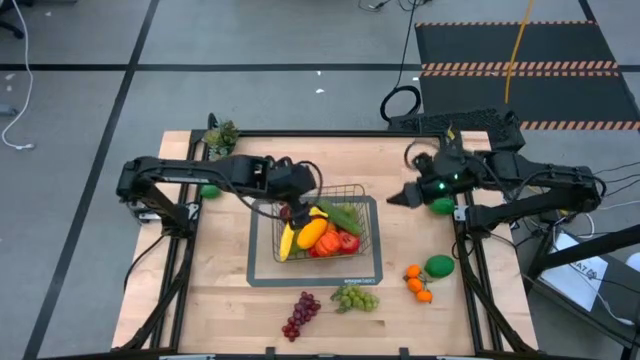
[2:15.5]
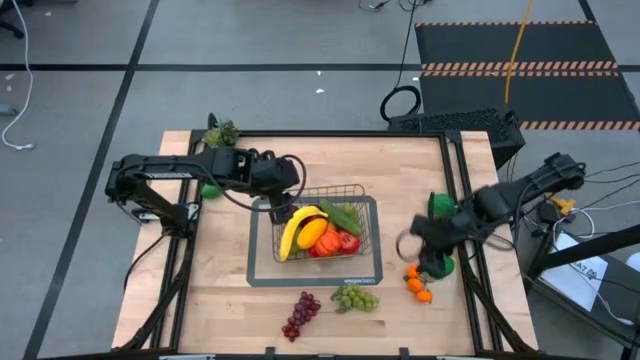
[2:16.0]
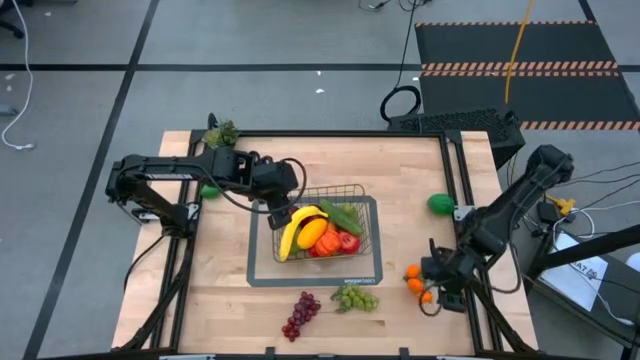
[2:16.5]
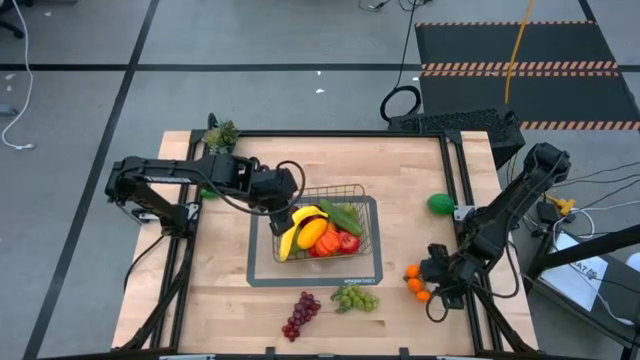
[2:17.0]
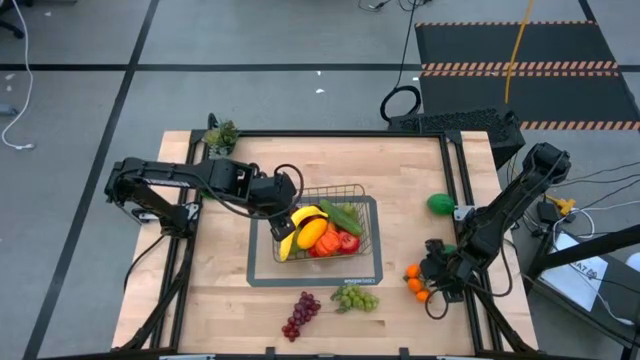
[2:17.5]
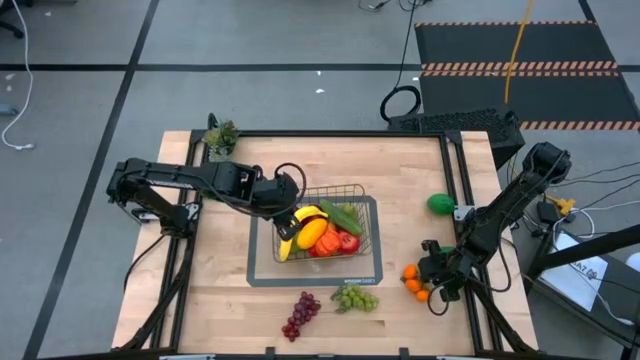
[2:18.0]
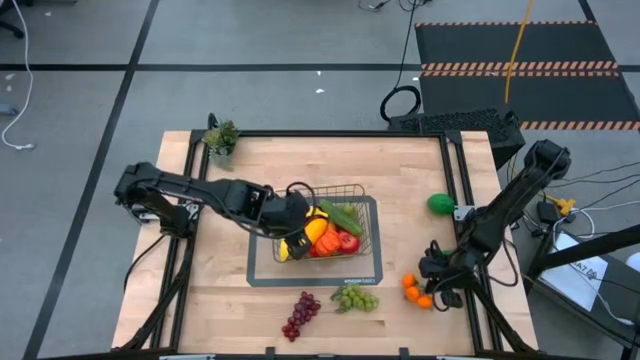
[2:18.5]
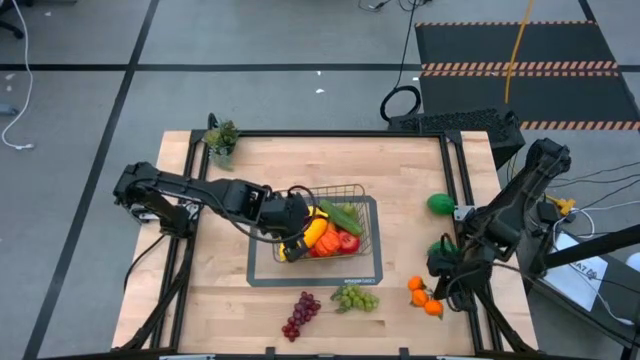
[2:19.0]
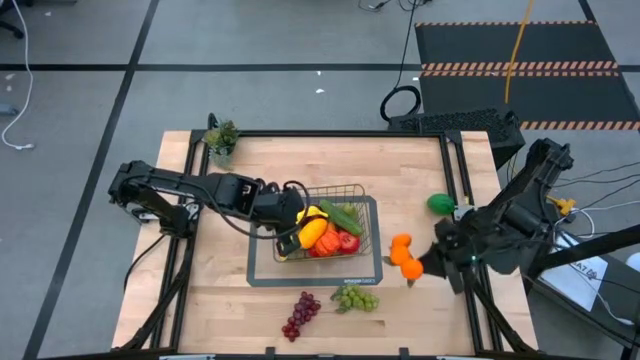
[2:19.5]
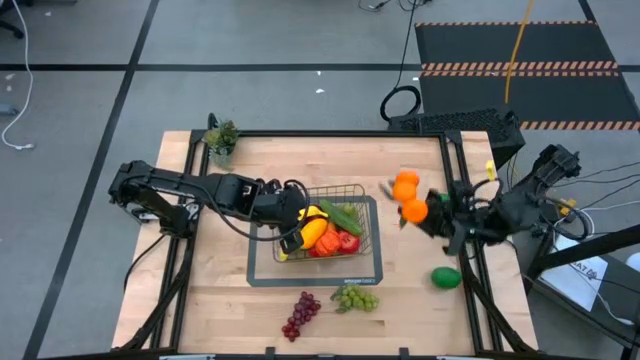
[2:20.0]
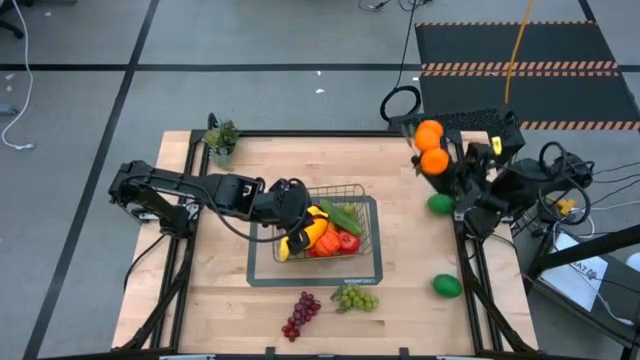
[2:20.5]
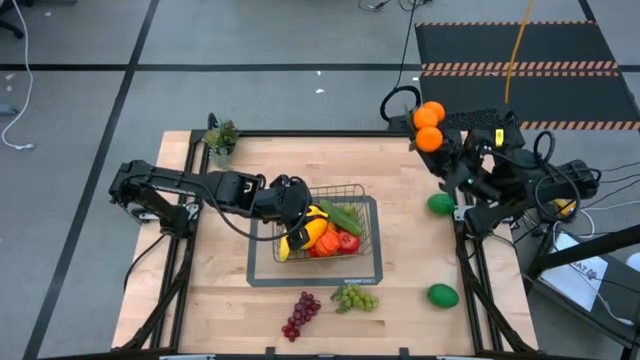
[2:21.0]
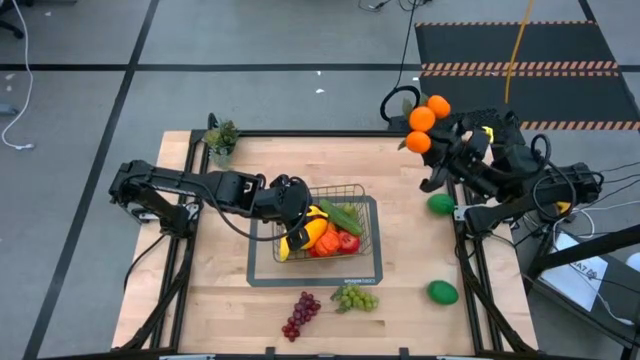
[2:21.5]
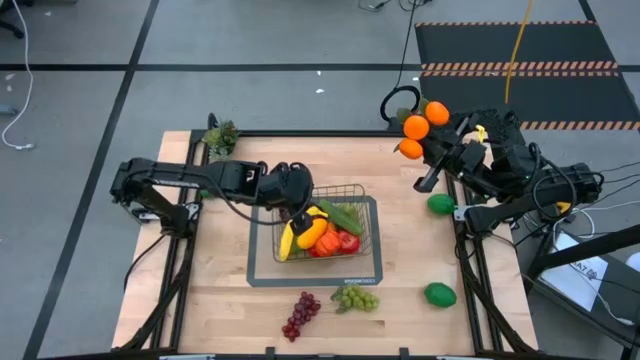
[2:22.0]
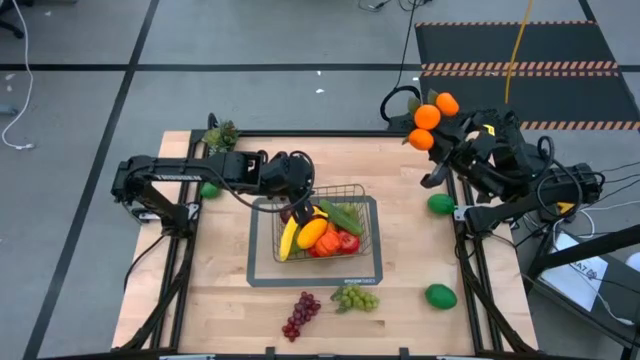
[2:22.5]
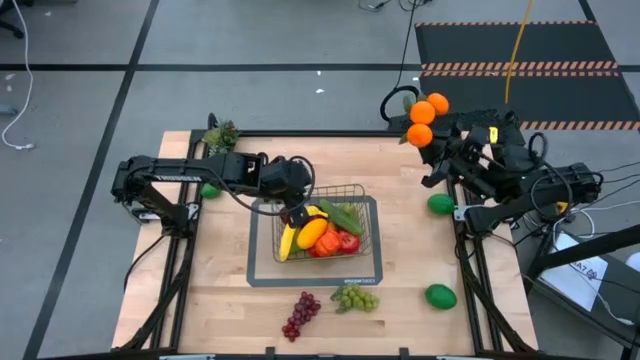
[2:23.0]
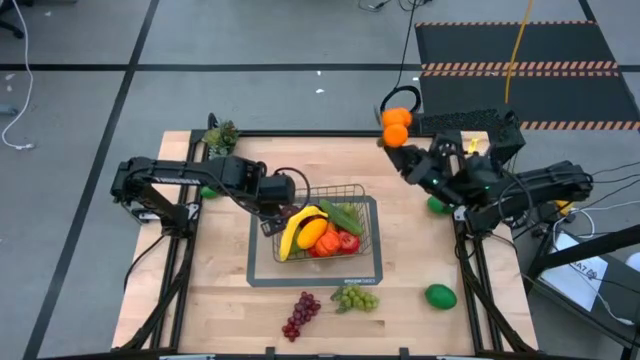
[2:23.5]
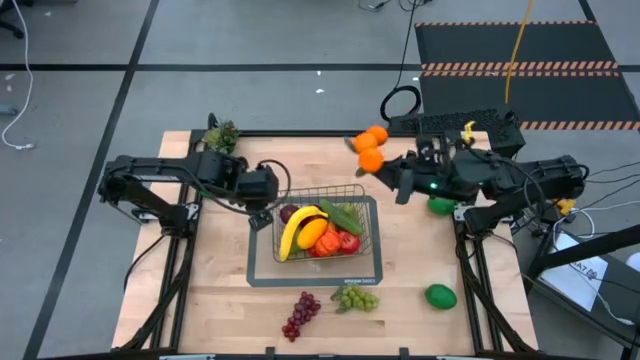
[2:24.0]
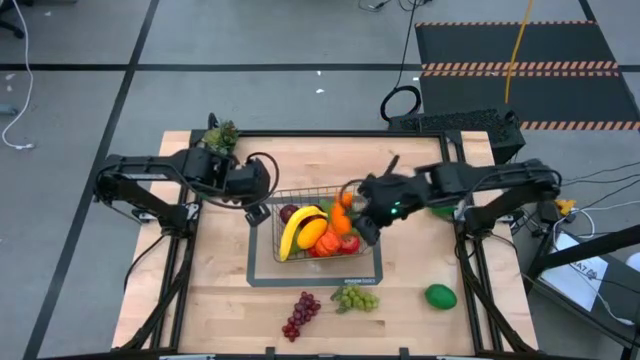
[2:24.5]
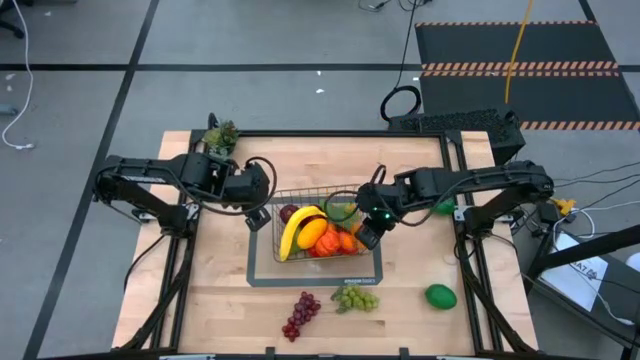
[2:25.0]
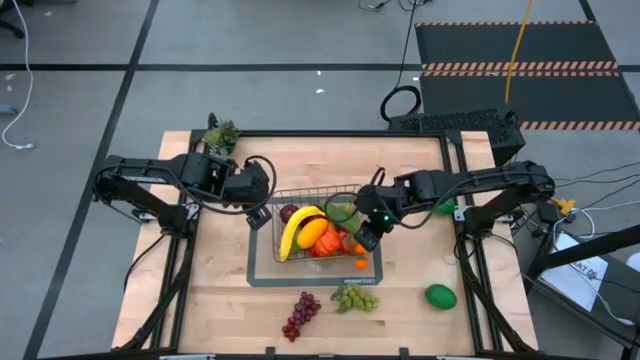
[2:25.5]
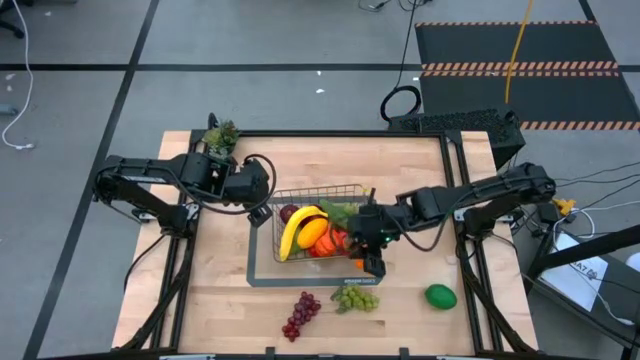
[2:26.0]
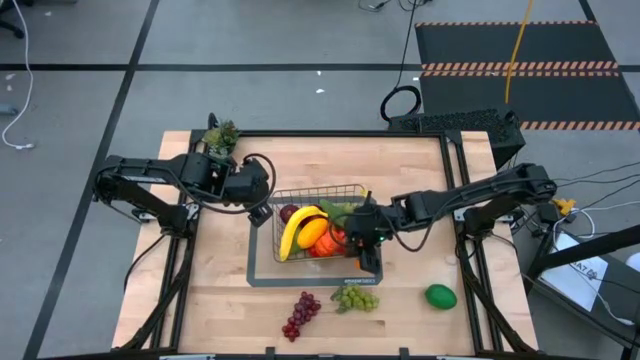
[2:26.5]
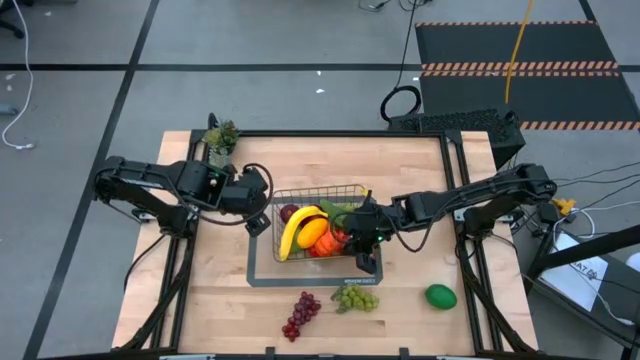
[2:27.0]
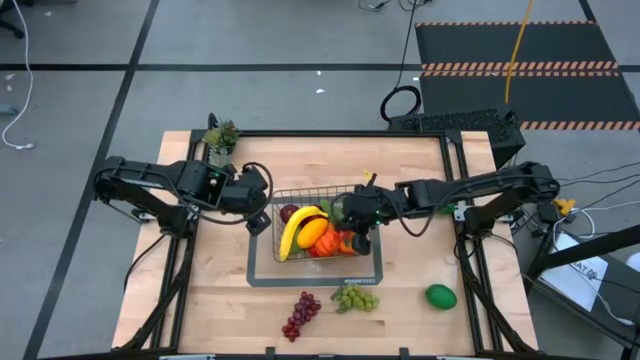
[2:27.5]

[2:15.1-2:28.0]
Task: Build produce basket
Put the tangerines into the gold wire basket

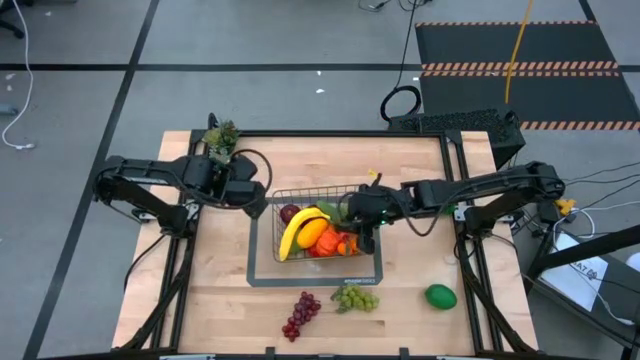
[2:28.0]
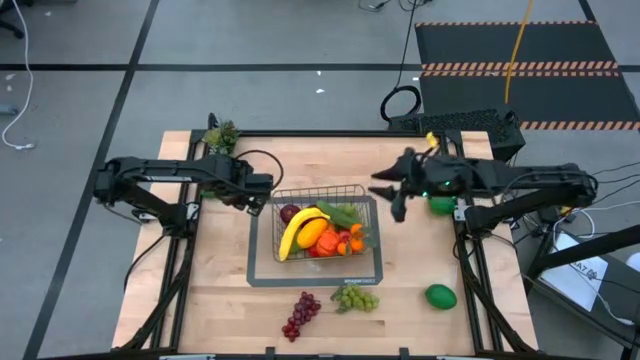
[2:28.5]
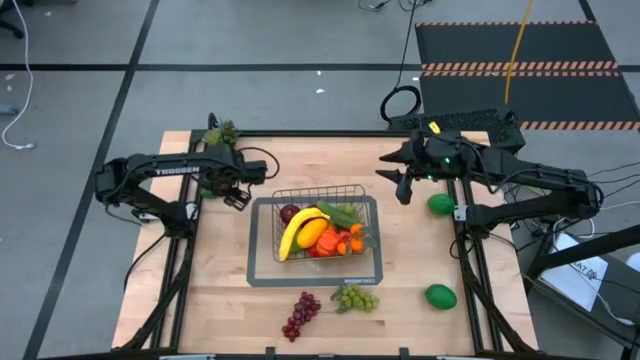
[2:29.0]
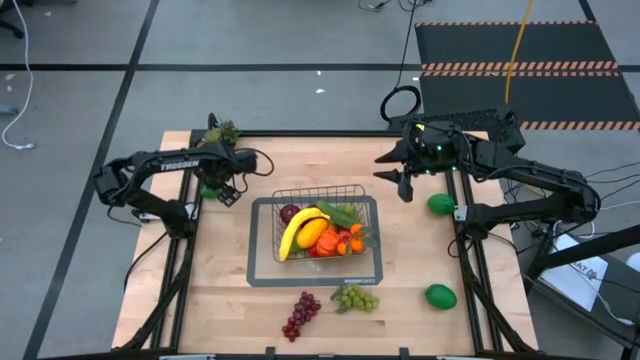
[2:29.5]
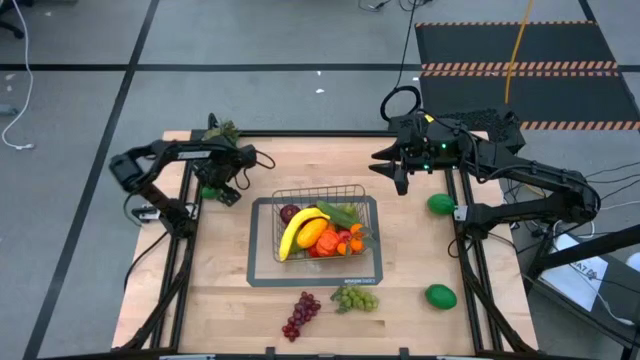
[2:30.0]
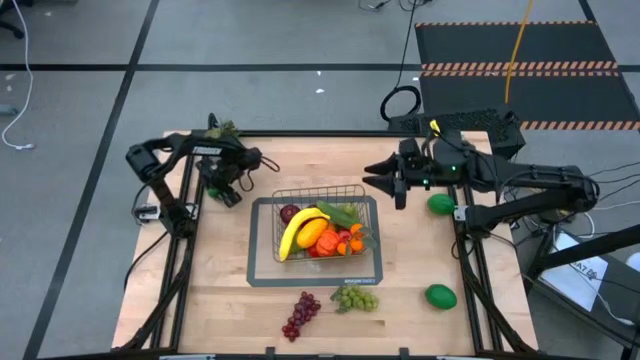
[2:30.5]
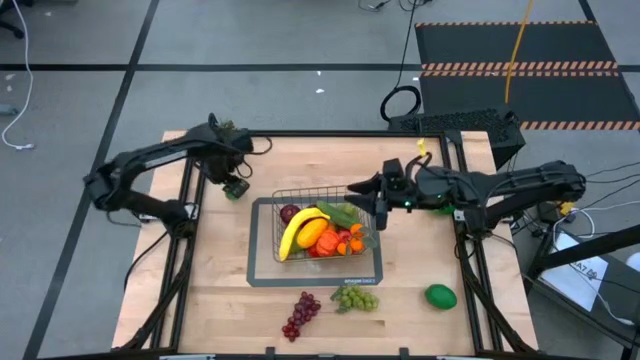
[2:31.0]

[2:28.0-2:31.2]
Put the top left lime into the gold wire basket

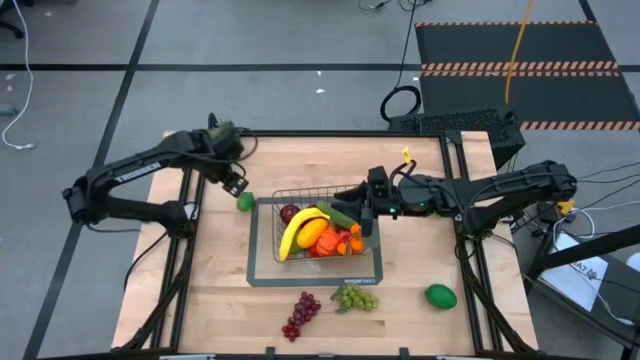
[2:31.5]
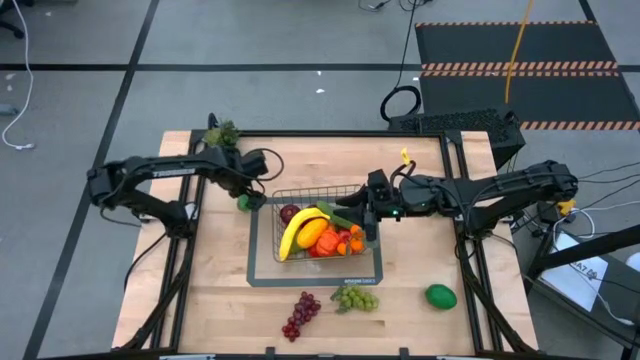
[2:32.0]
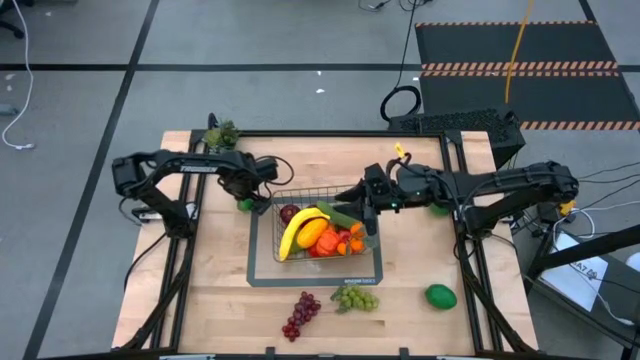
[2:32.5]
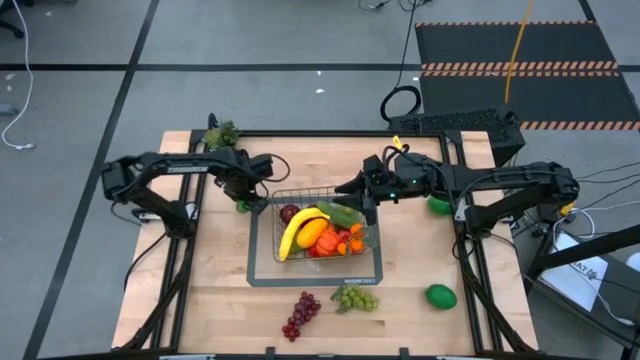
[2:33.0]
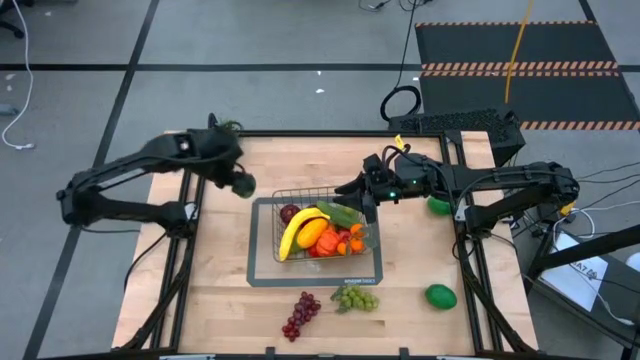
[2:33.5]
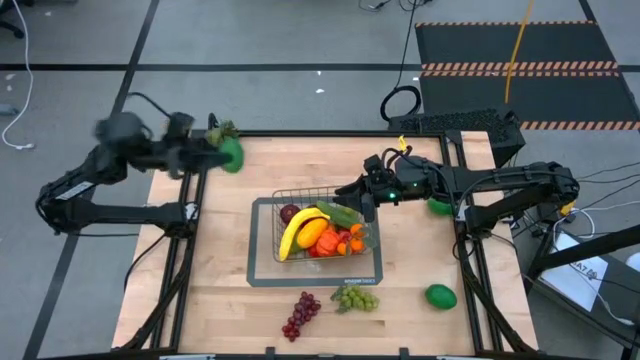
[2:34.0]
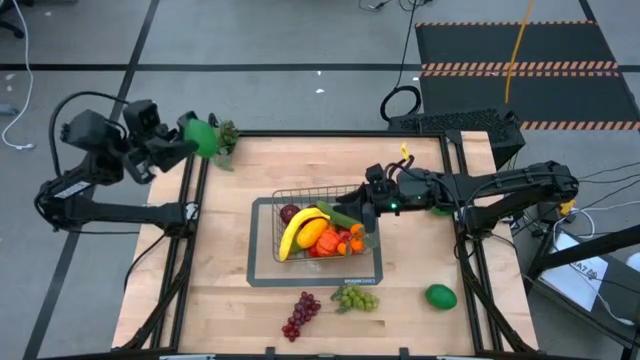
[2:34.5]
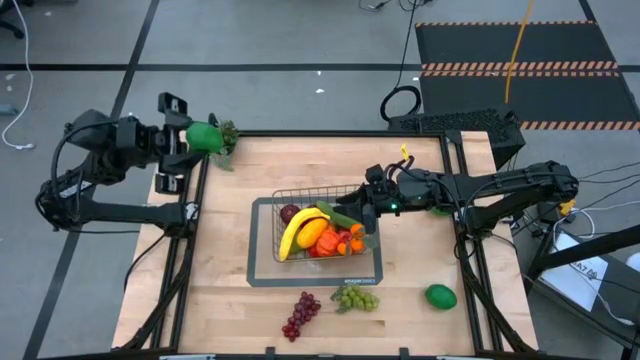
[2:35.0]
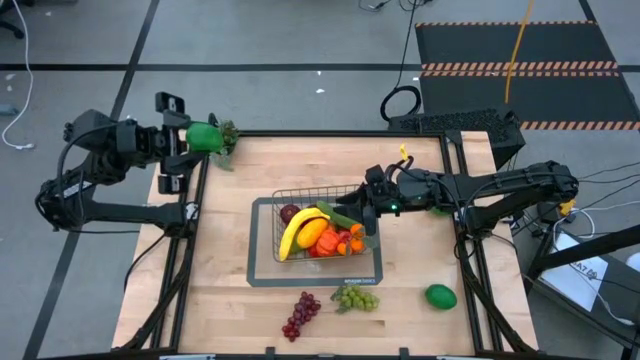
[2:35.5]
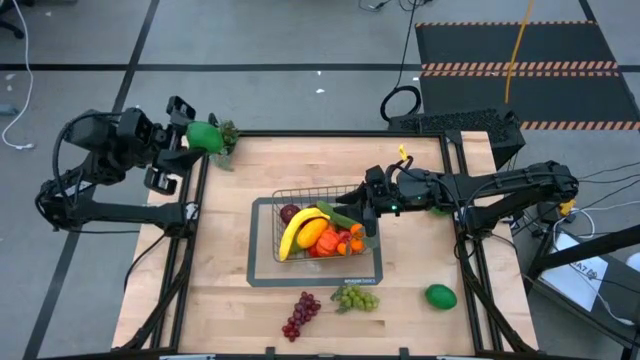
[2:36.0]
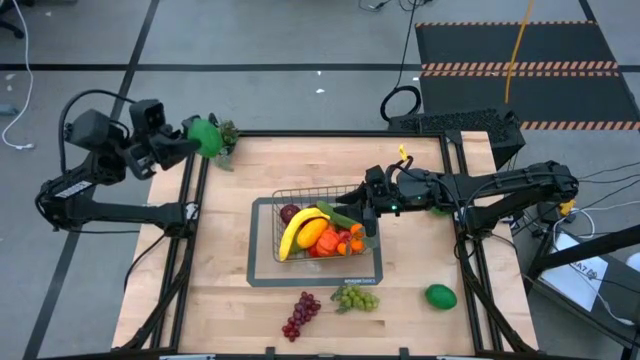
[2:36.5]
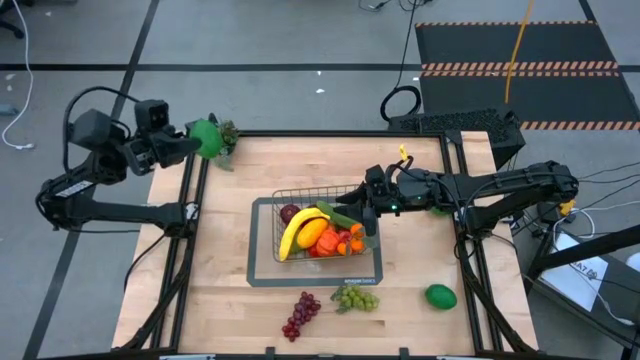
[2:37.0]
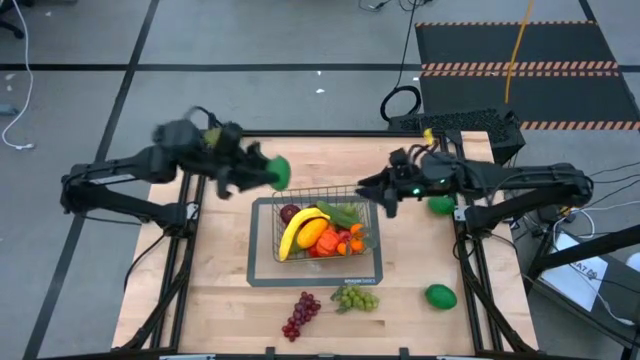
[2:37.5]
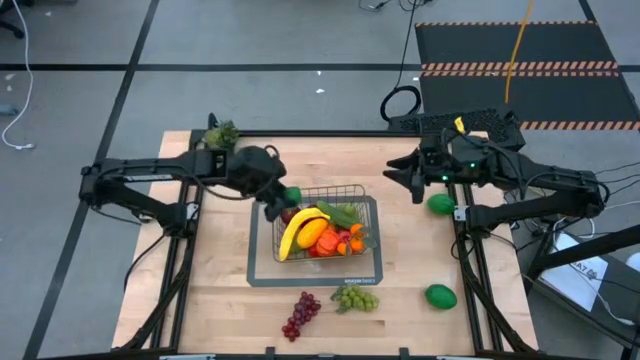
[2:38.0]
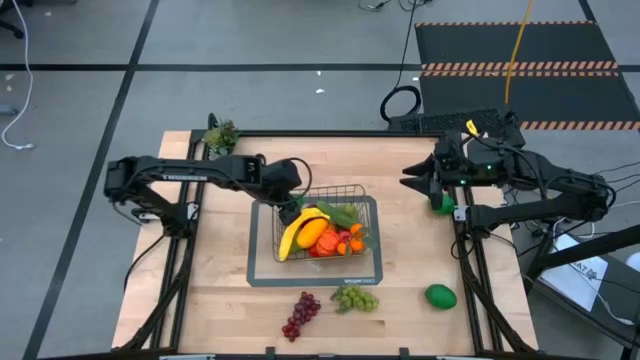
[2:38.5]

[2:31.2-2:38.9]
Put the top left lime into the gold wire basket
